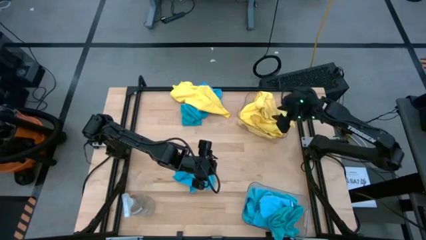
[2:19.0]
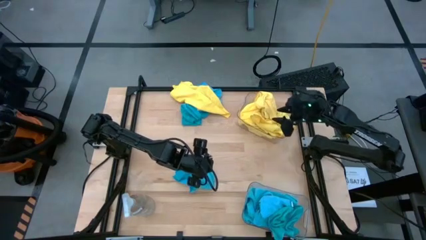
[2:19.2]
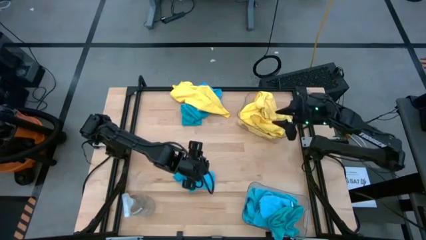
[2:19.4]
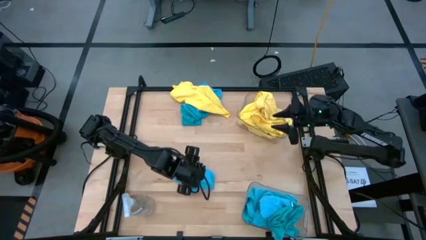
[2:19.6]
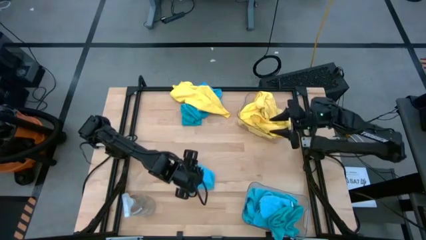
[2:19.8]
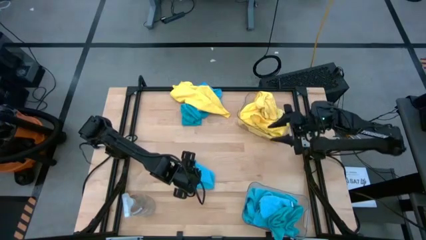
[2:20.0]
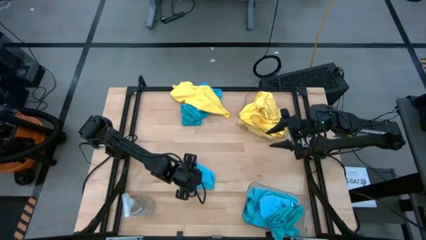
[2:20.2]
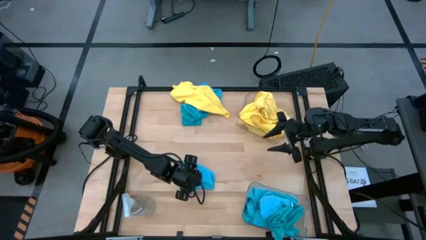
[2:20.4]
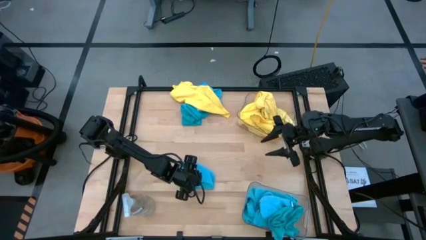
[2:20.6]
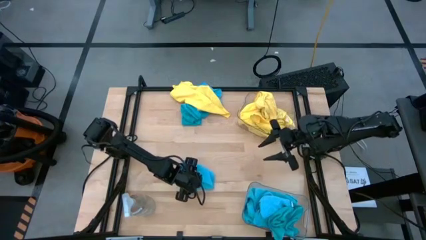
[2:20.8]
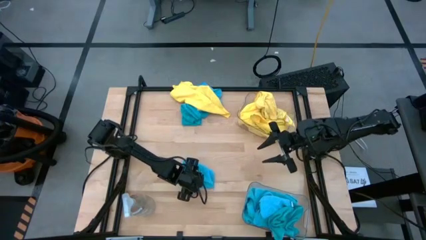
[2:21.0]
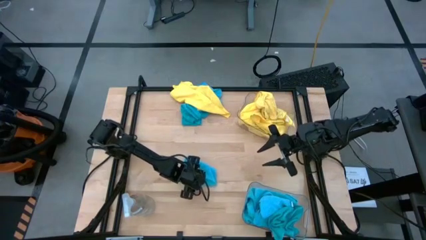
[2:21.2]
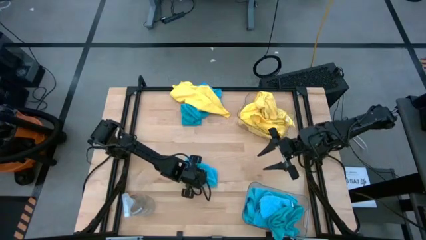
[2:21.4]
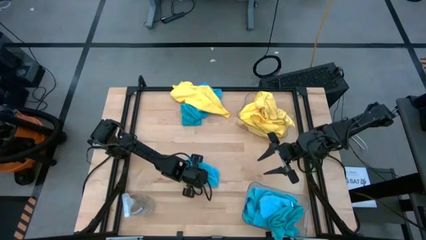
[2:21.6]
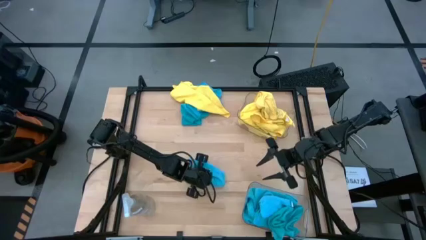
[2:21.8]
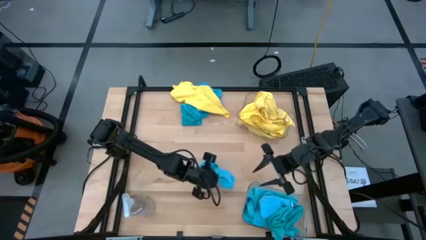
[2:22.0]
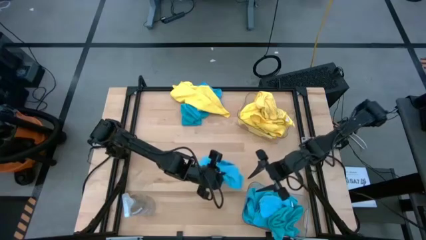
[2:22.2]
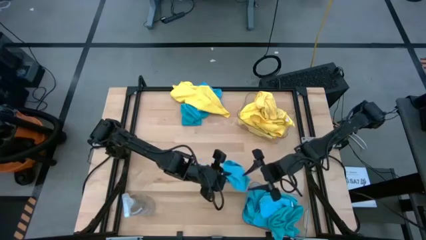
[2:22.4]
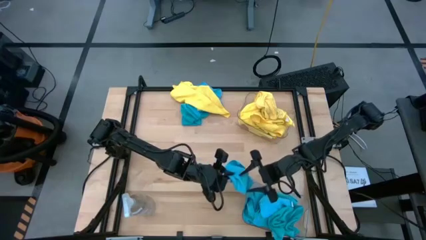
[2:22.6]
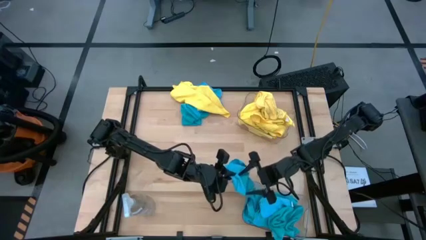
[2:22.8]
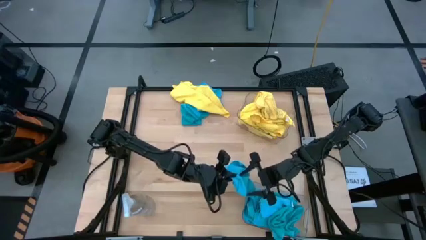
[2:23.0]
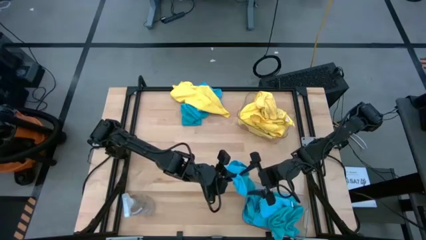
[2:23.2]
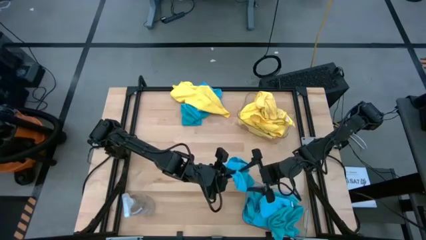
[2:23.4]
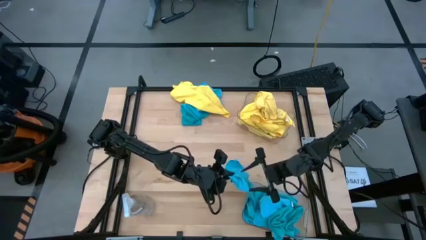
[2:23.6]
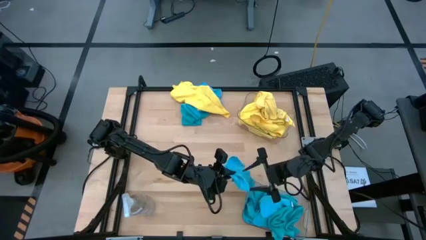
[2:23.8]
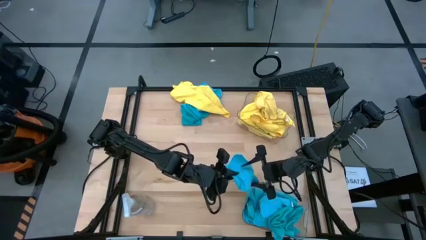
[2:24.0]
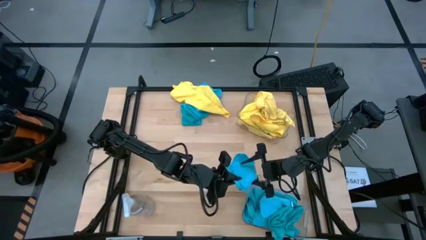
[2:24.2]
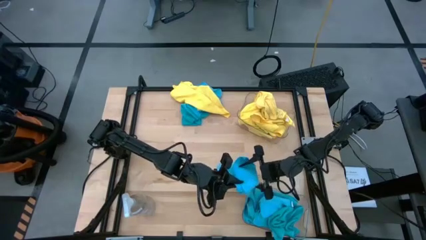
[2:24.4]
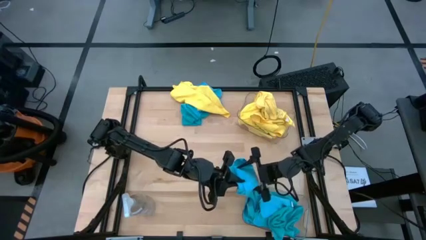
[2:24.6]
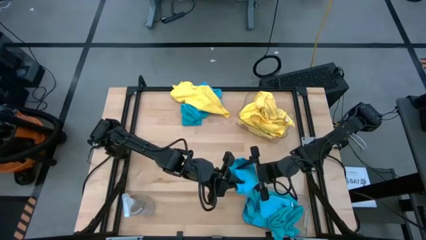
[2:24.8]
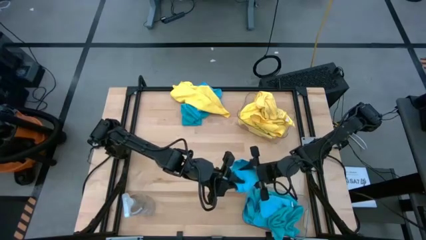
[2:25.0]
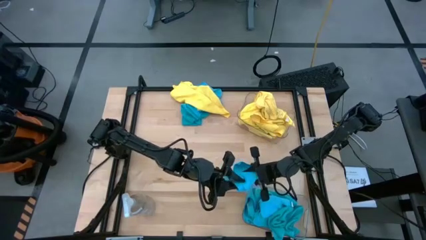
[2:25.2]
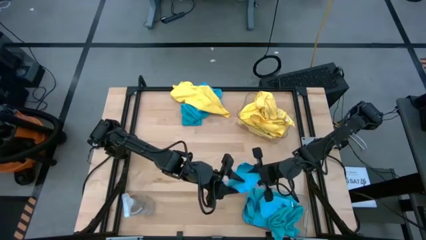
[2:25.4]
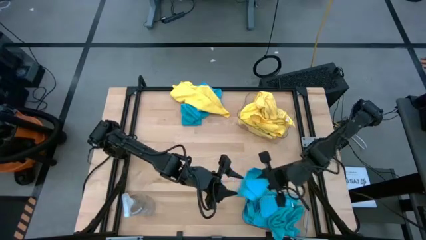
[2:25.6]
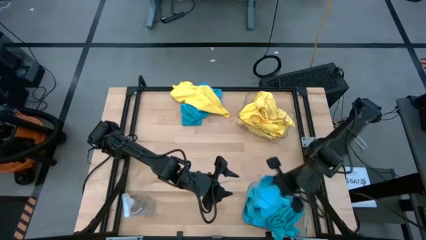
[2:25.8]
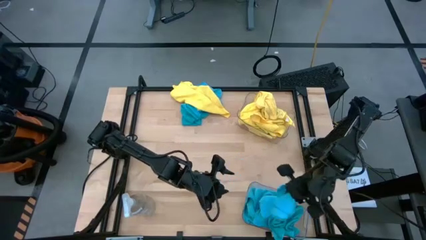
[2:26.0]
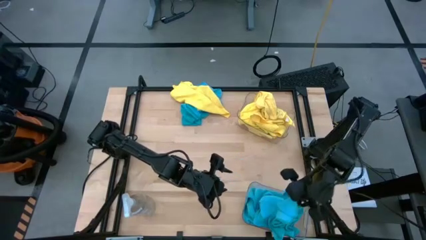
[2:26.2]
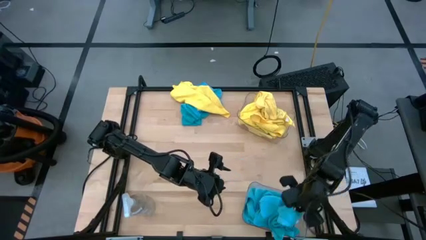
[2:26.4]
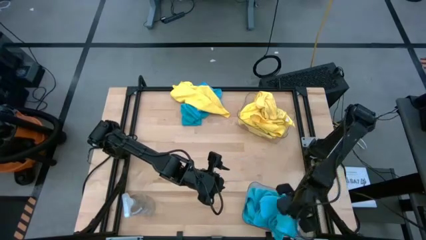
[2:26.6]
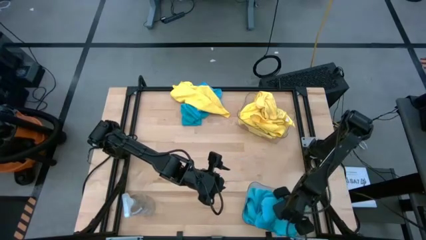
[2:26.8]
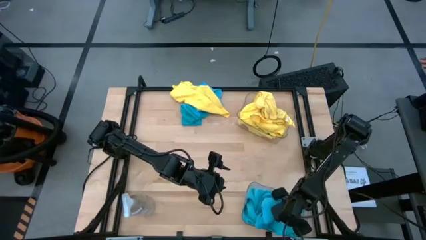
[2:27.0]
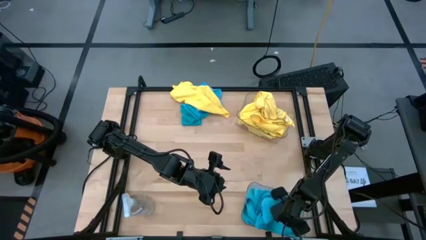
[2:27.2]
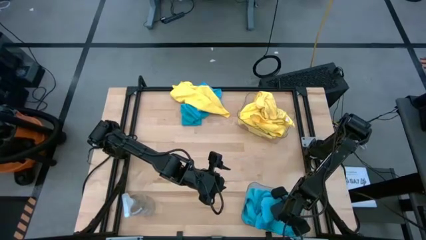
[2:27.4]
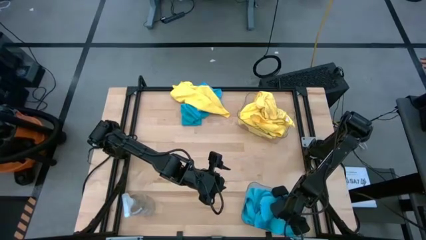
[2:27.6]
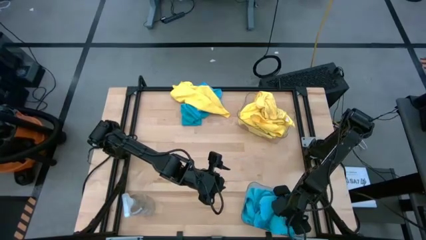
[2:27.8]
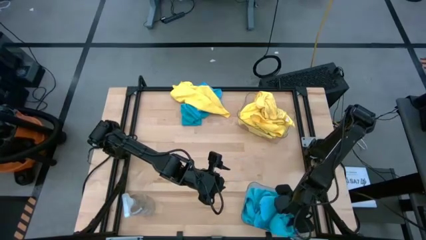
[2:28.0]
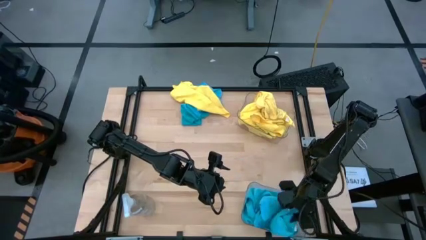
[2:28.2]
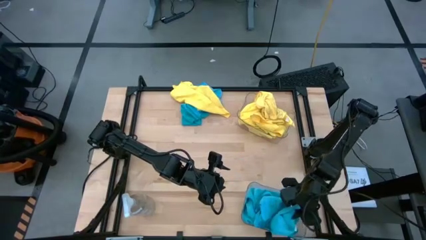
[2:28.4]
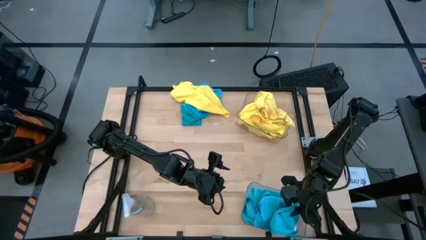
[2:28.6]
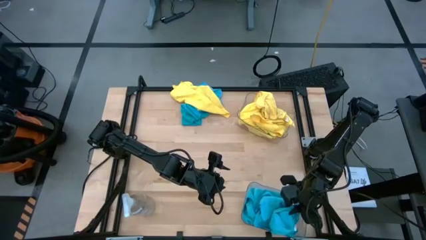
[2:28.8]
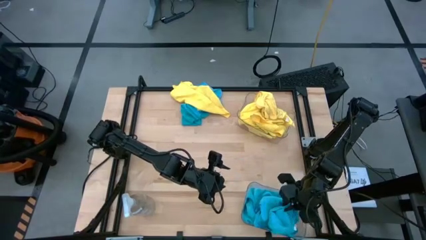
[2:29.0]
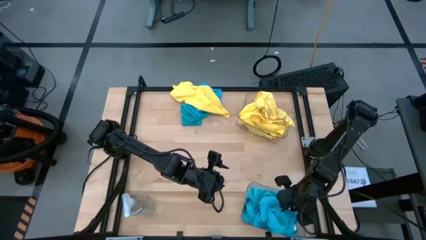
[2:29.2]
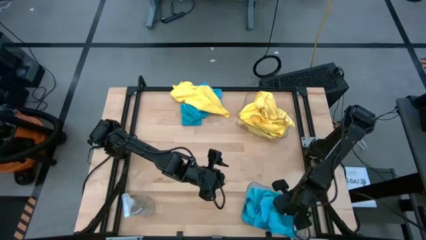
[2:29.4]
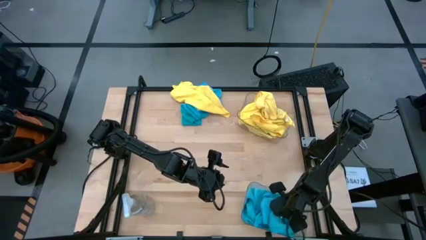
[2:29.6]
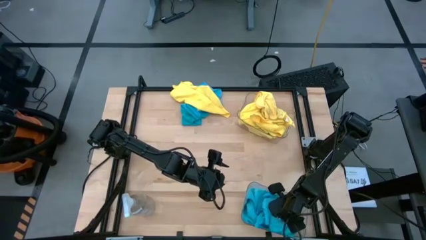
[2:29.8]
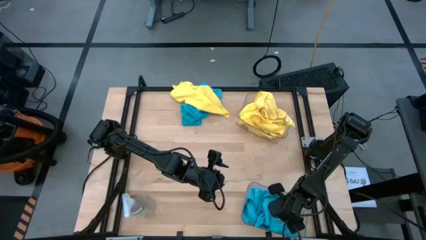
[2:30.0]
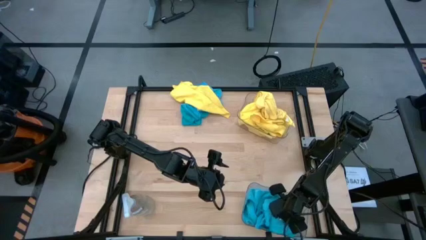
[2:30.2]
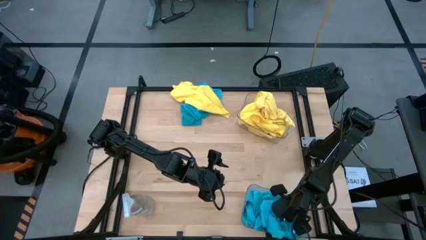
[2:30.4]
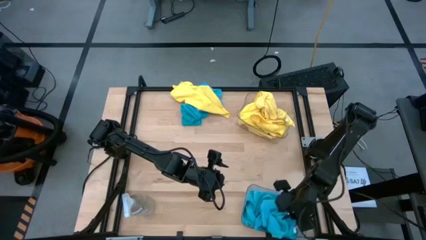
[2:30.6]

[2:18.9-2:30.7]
Task: Sort microfiber towel by color & place in baskets
Put the blue microfiber cloth into the bottom transparent bin
